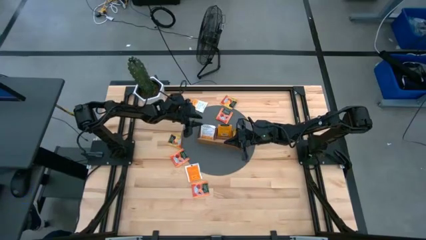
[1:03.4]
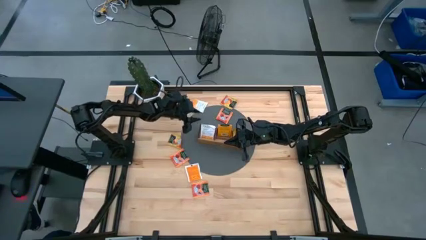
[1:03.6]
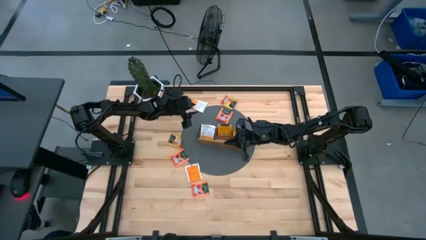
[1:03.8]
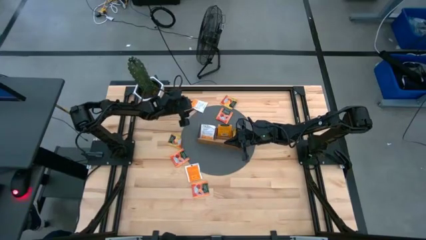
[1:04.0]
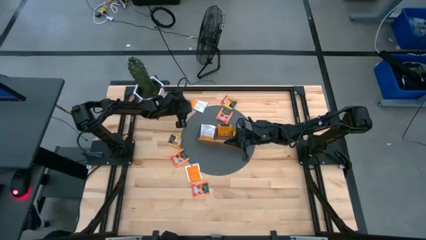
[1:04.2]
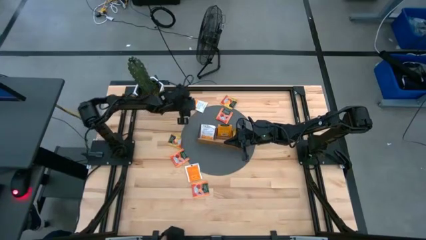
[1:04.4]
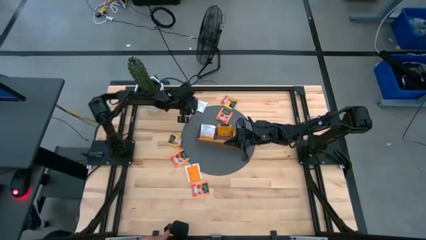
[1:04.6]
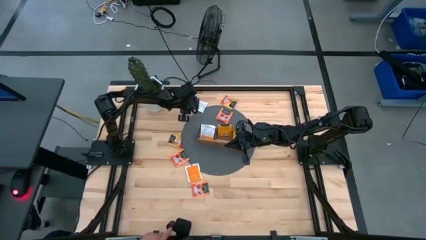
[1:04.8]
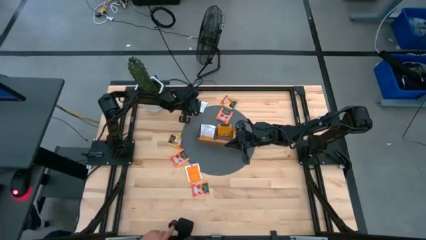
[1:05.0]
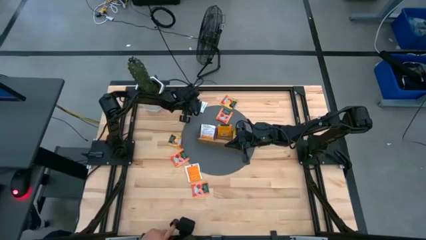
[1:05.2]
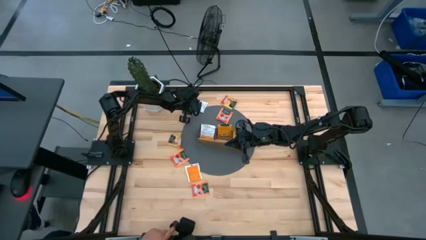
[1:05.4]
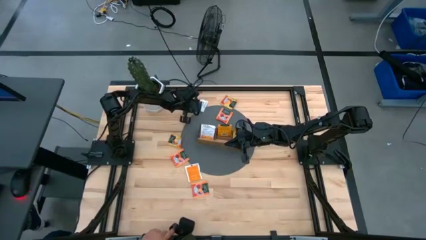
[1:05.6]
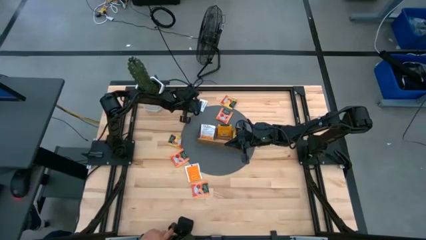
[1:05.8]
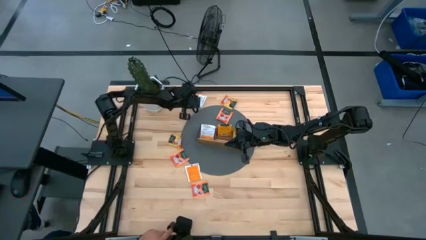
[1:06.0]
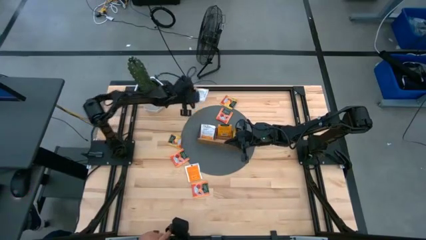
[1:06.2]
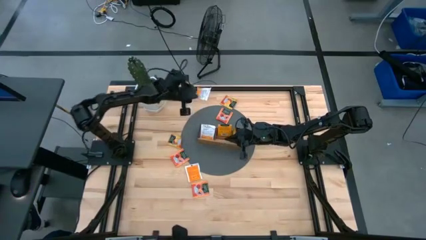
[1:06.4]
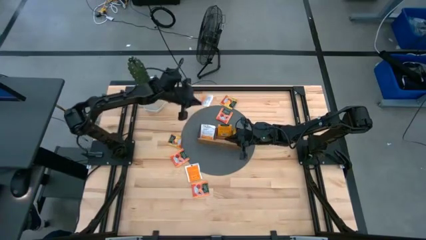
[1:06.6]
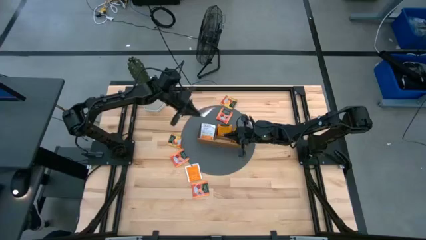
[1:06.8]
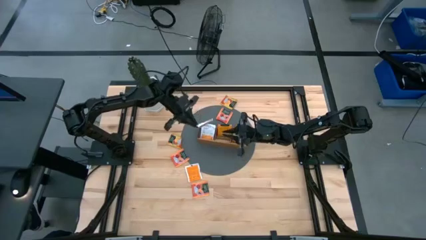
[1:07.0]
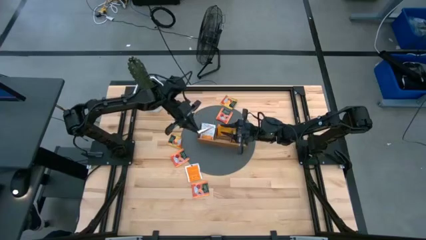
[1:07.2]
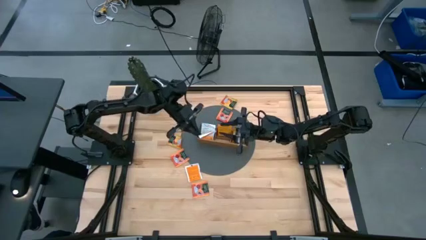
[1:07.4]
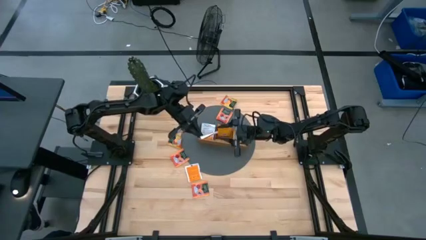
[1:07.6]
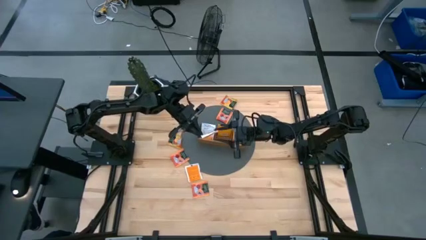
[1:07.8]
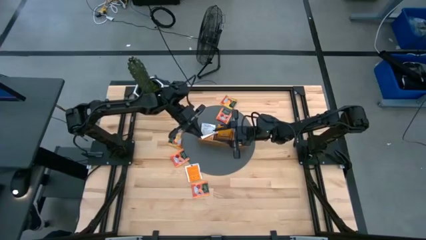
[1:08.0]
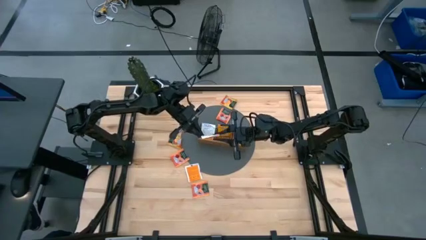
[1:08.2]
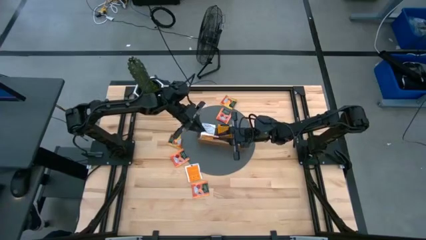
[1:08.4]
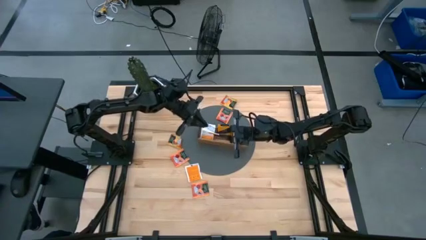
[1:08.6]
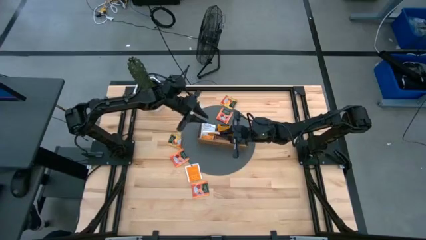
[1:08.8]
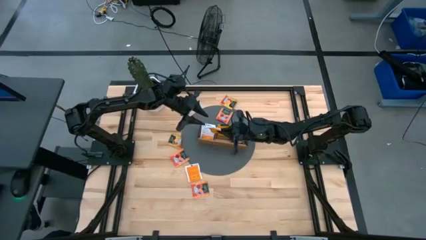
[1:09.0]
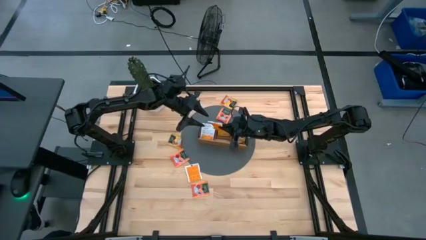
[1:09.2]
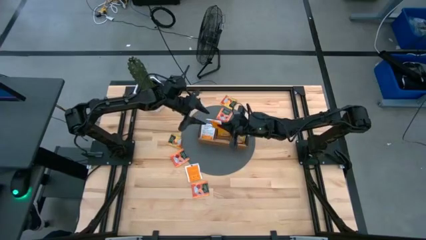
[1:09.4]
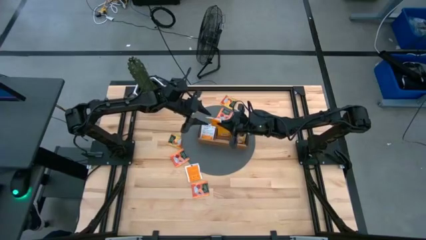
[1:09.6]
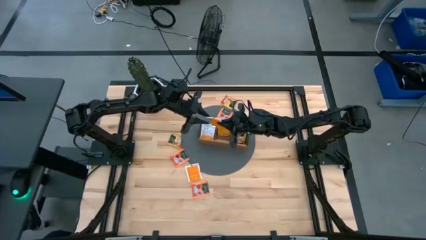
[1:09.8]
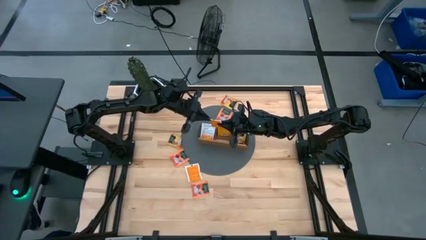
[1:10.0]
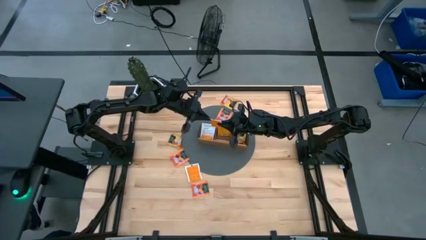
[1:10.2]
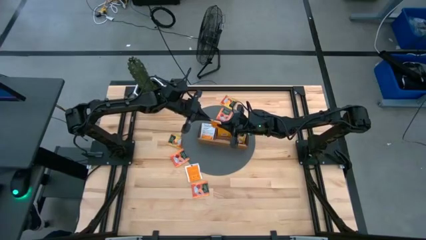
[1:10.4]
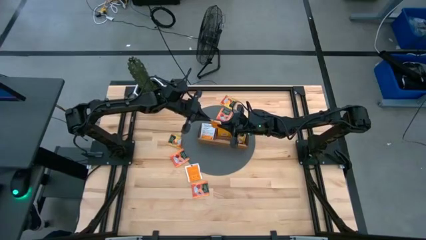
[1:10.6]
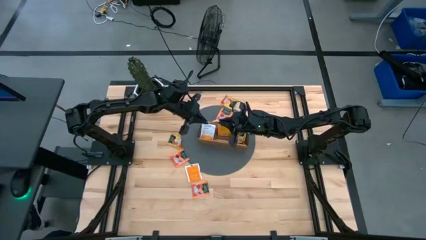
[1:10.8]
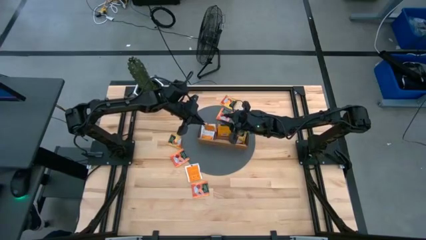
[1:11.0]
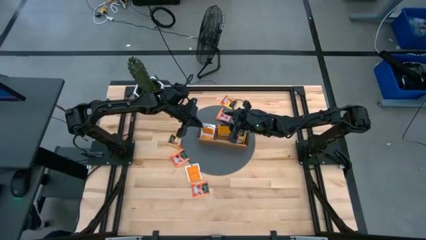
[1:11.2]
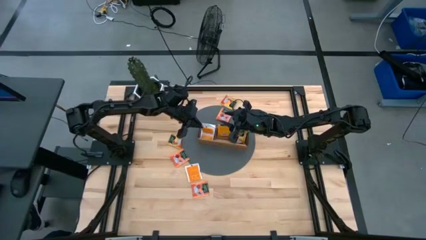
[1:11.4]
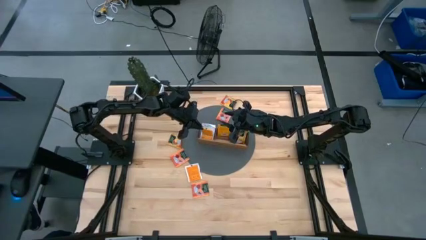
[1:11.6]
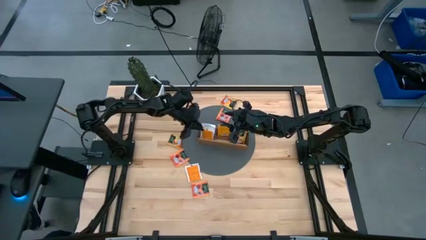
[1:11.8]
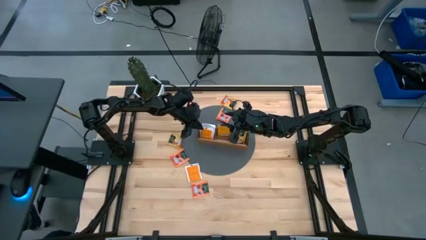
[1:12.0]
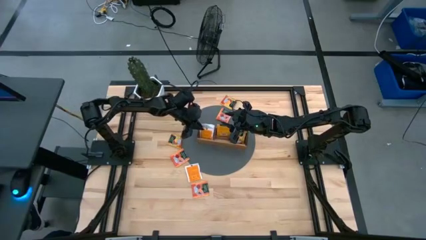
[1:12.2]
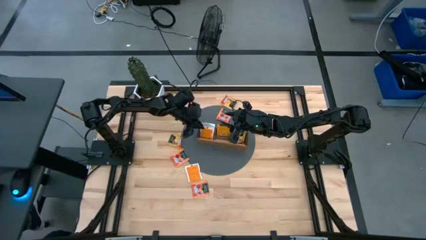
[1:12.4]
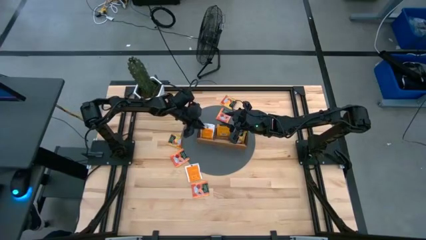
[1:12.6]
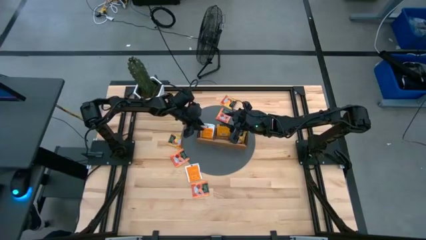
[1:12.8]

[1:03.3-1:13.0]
Task: Pick & Place Tea
Put the white tea bag into the left section of the wooden organizer
